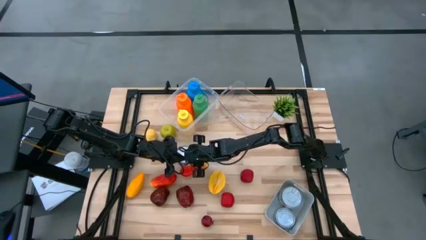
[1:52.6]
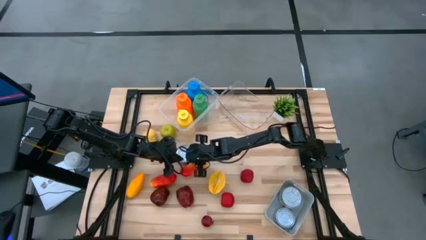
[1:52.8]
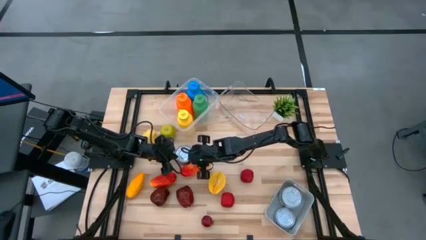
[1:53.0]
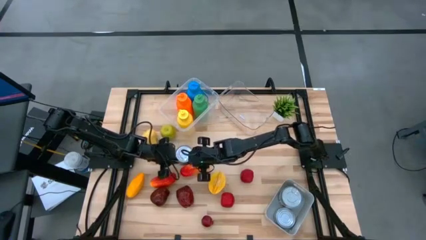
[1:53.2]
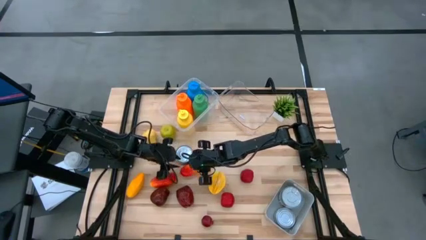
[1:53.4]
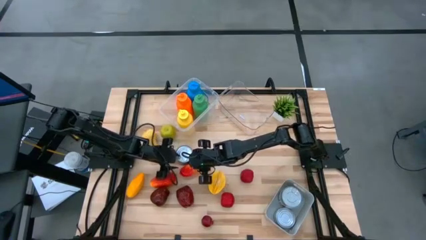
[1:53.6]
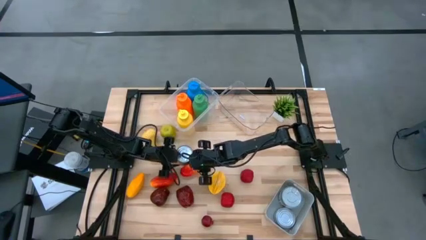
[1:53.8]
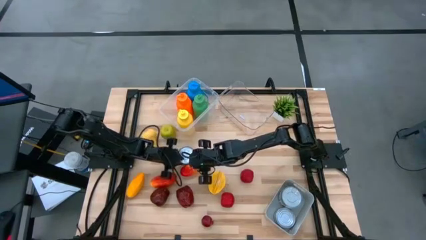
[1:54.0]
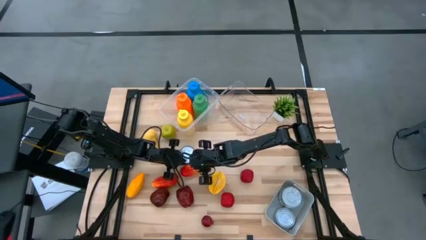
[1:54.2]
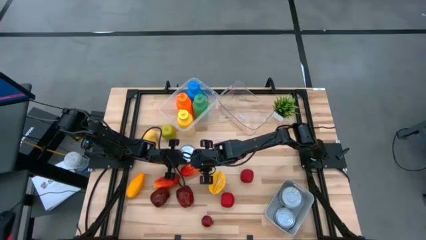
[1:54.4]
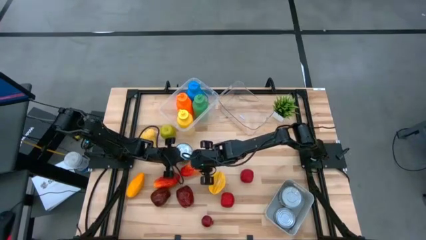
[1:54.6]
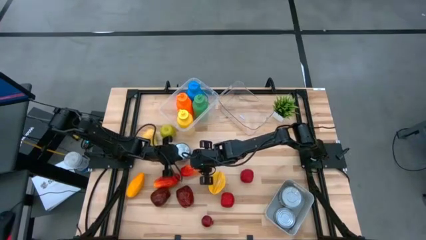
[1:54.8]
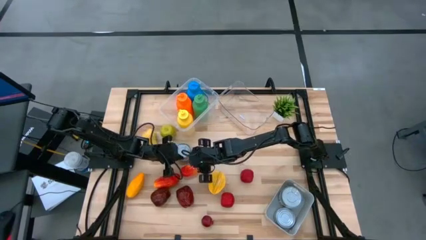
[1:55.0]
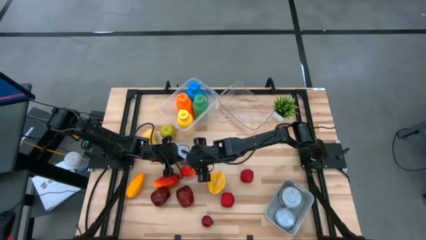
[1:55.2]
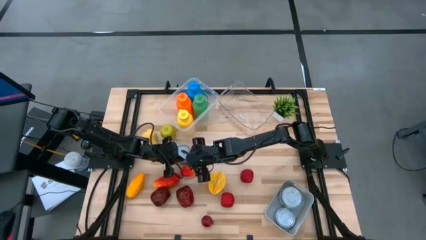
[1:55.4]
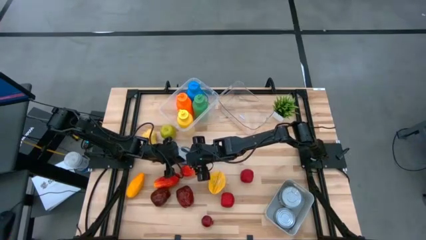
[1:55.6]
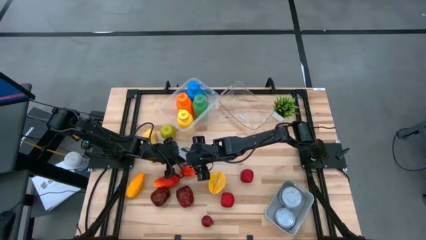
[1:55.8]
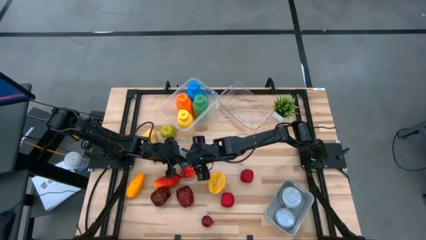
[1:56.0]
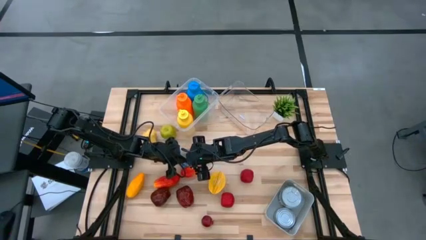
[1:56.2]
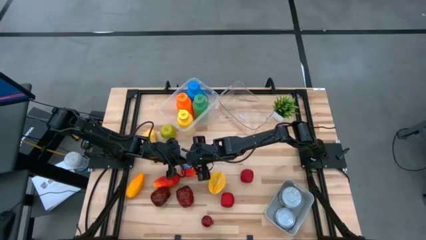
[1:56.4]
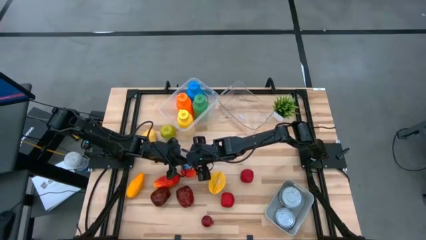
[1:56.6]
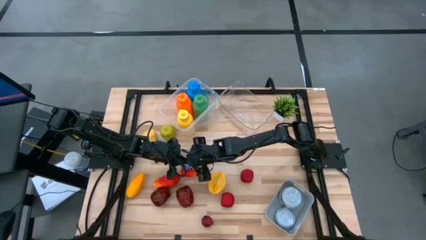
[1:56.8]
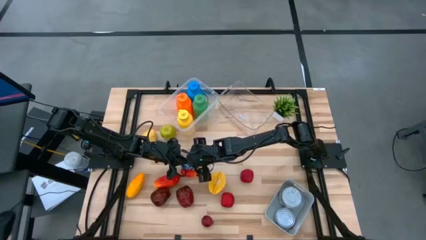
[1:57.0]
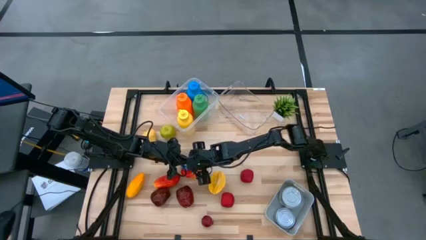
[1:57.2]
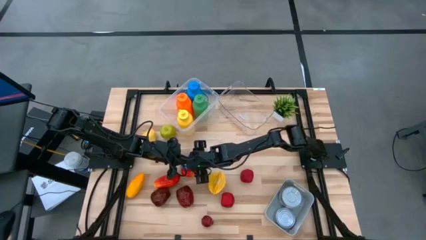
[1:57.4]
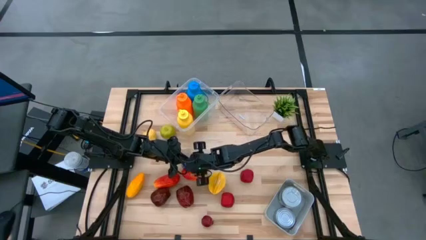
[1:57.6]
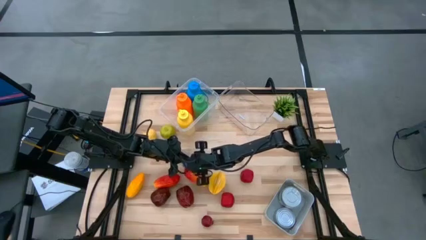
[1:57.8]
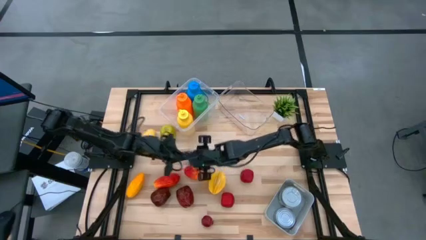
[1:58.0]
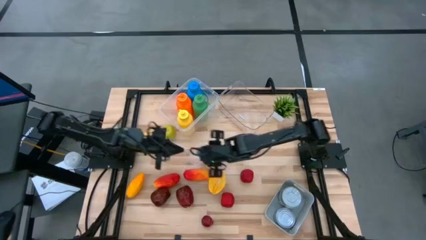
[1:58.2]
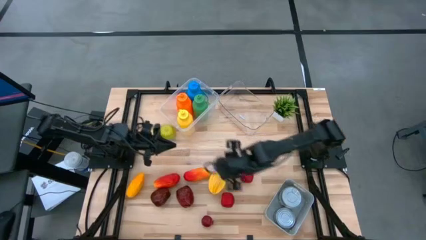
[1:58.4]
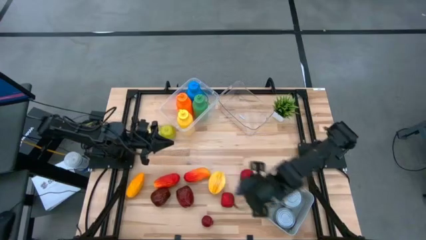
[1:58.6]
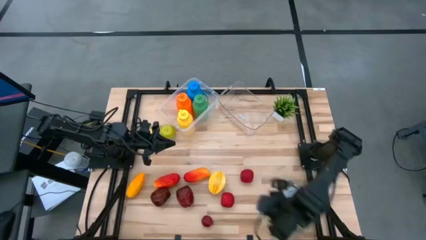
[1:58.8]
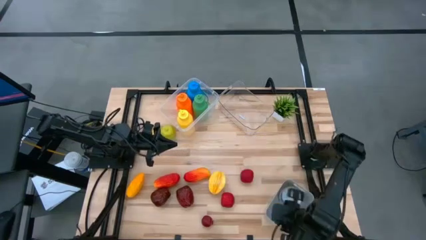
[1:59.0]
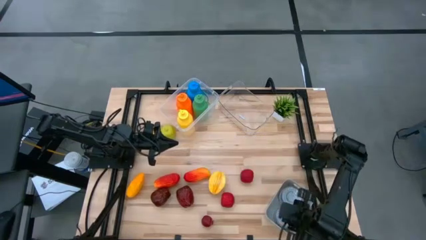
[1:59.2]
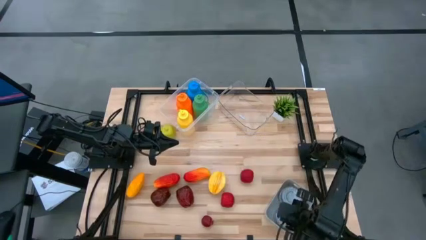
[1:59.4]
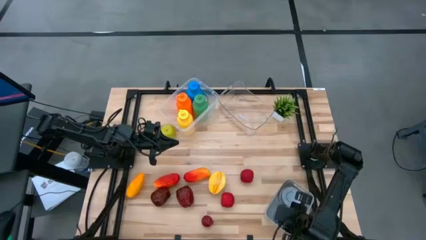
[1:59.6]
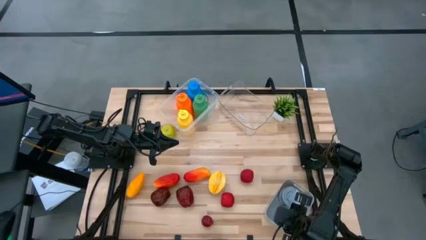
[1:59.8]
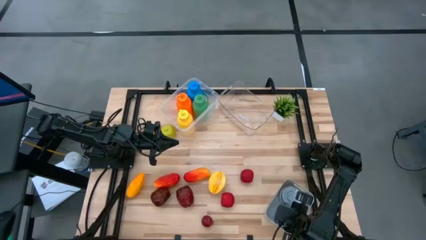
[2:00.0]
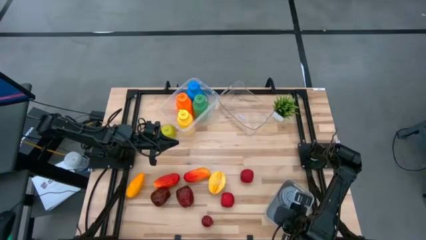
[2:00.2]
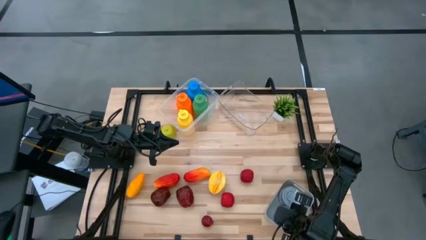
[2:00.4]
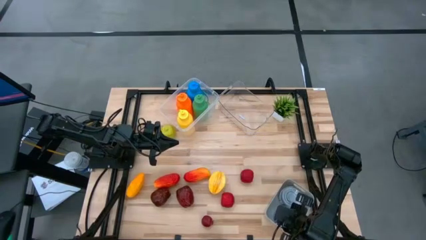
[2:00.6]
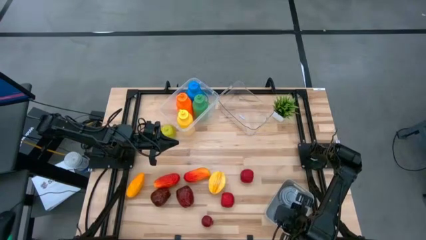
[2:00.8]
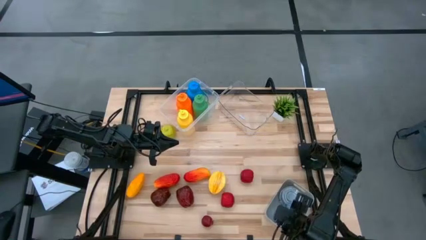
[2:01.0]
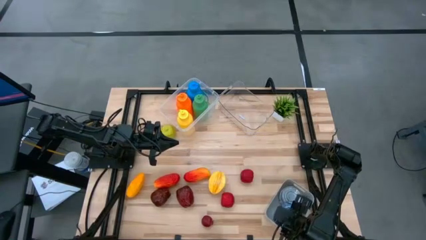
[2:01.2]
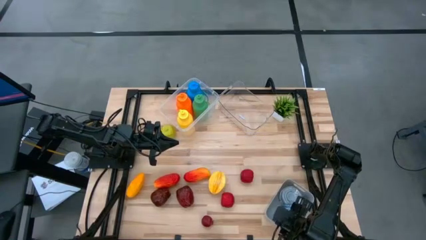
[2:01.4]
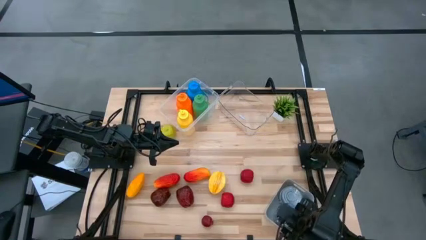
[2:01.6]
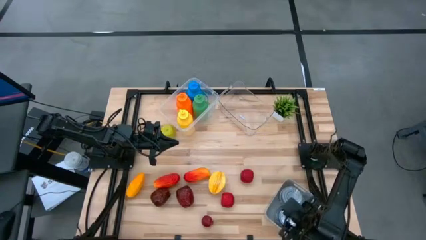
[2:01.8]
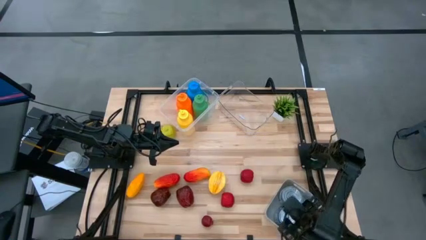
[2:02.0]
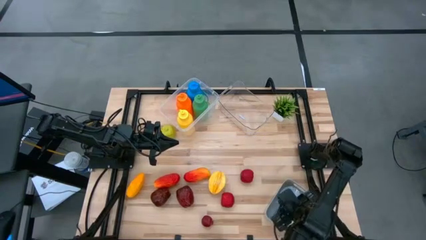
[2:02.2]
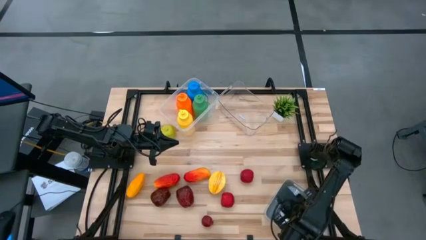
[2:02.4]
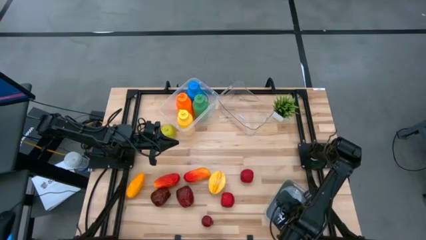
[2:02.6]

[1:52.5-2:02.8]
Task: Pick & Place Food Item
Put the blue tuna can into the gray bin

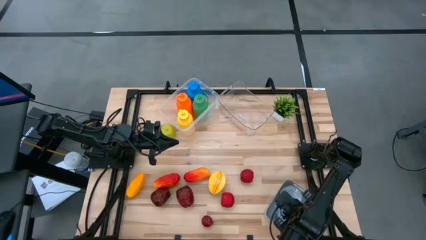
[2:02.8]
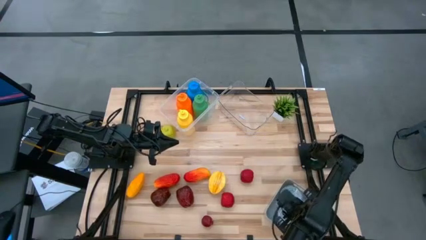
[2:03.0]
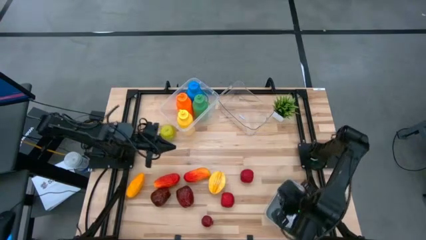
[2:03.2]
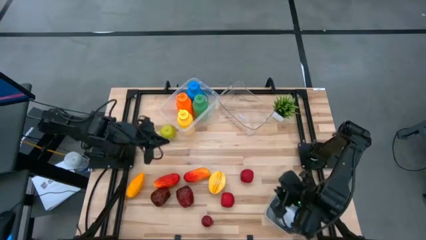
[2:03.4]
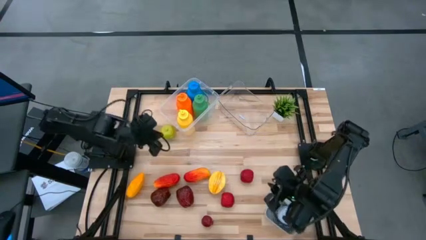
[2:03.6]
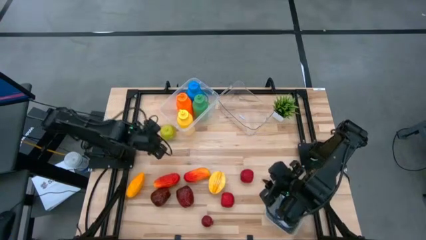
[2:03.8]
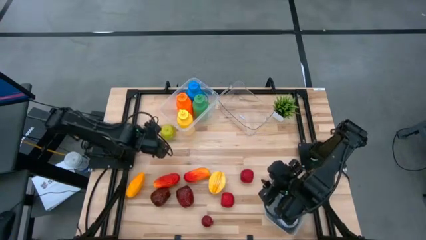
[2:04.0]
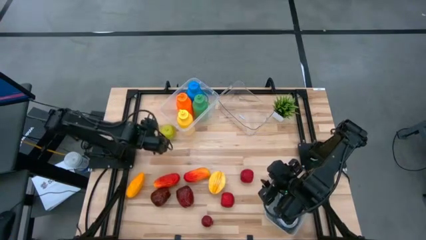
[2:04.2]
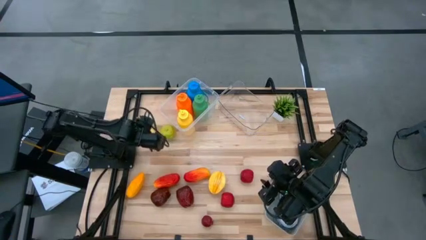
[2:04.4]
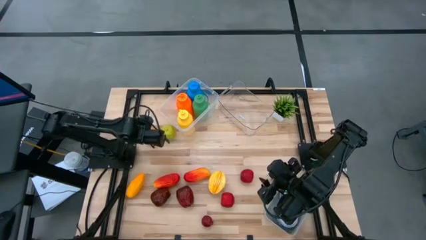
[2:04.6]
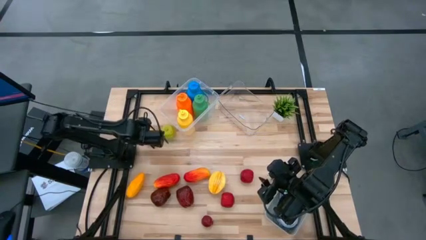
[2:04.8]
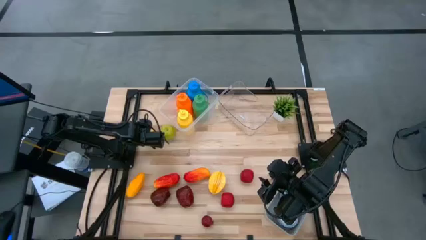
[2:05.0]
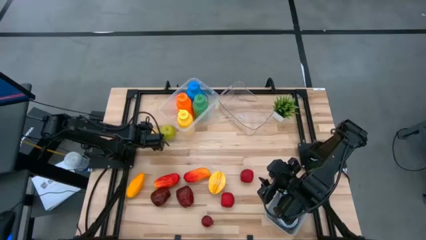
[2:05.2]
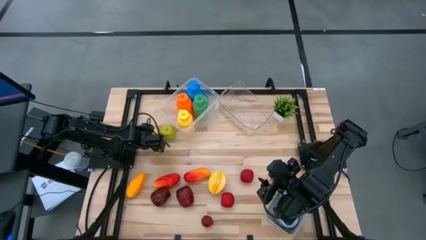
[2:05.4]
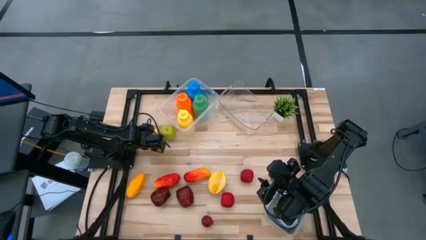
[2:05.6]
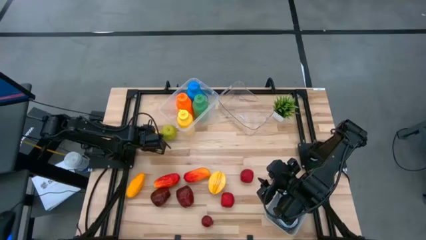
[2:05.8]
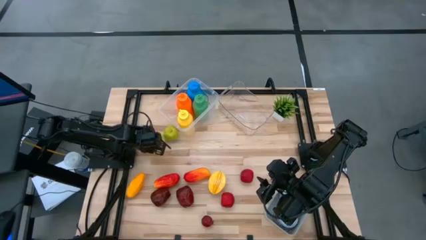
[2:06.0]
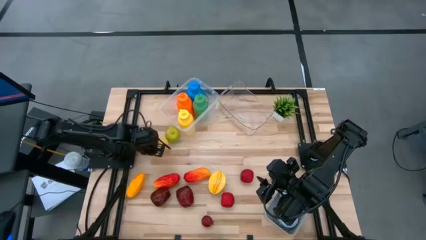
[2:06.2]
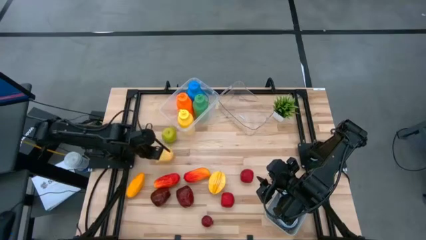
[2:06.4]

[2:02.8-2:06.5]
Put the yellow pear into the right transparent bin

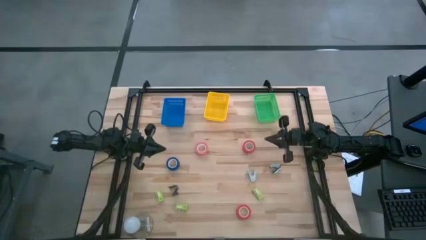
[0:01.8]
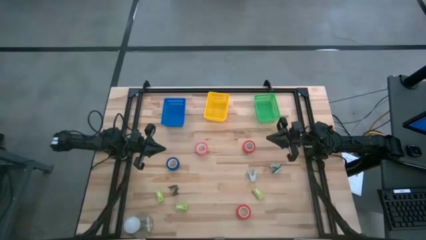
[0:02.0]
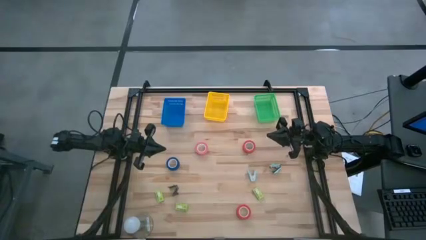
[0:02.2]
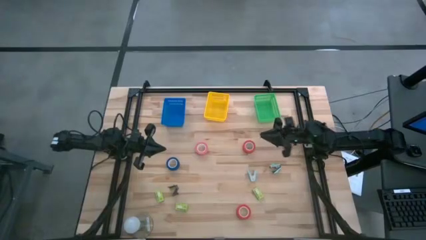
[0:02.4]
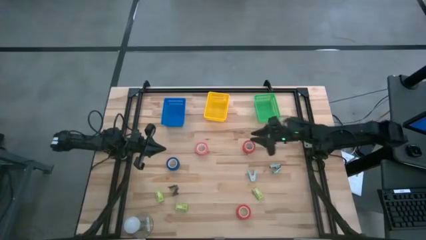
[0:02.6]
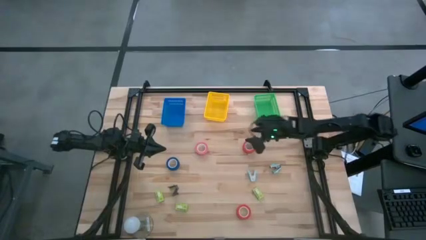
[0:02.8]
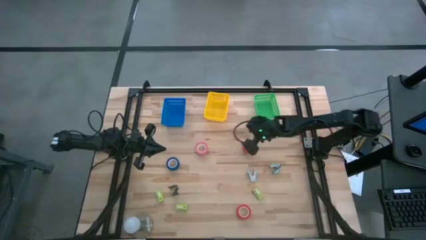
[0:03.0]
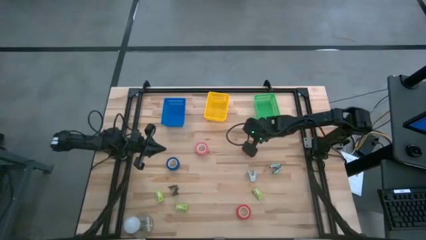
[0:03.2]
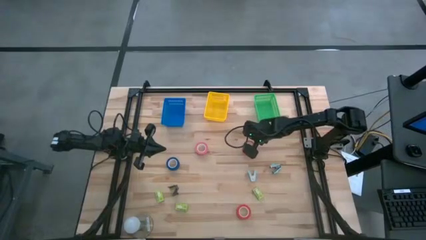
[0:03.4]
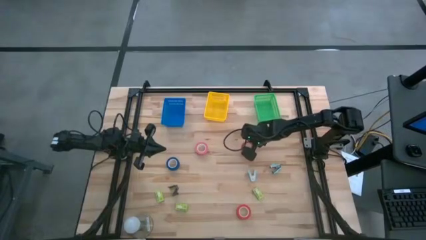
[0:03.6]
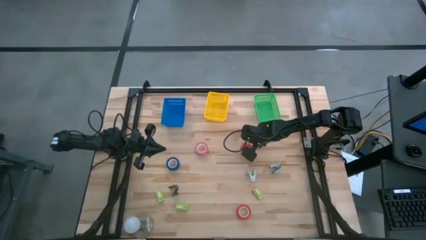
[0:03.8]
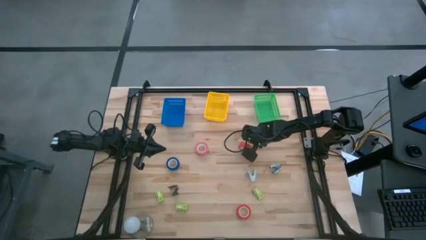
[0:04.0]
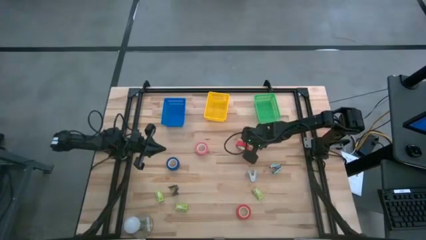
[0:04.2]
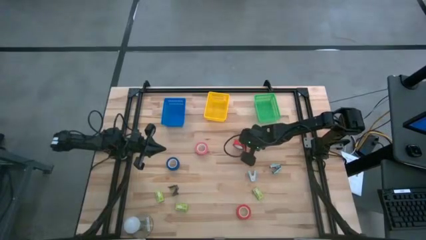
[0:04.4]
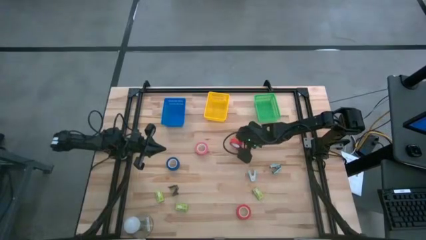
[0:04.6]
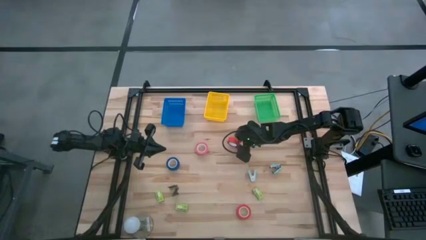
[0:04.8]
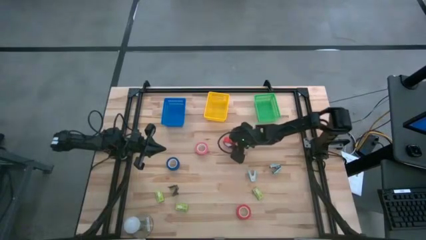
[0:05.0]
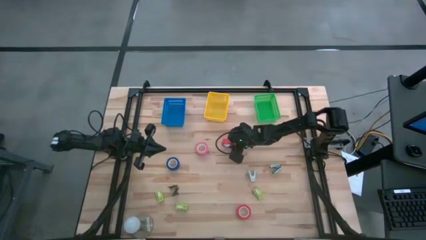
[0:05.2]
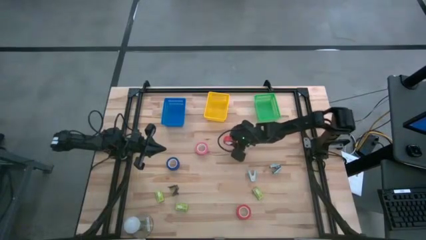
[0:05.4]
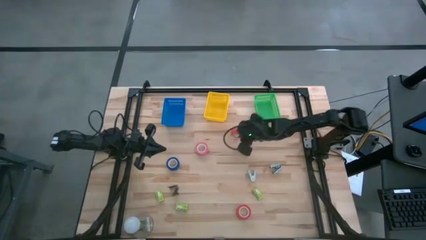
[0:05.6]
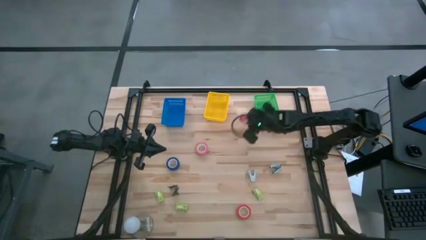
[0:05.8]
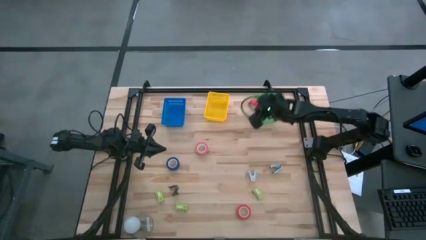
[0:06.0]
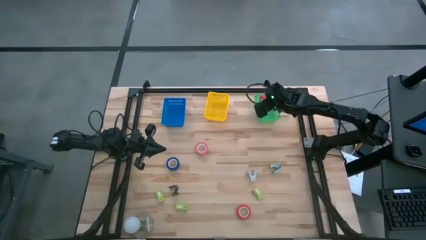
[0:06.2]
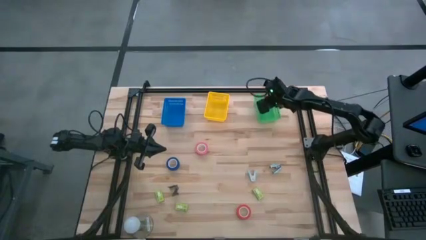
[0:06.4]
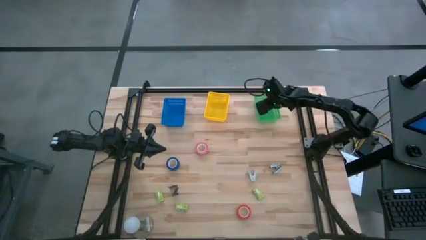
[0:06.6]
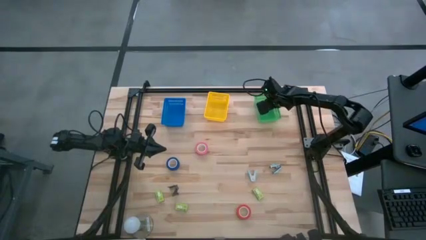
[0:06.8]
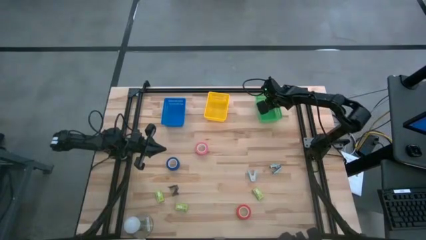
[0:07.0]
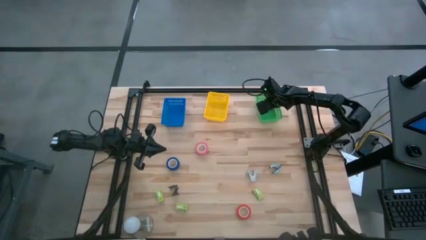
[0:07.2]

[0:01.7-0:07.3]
Task: Pick and place Stapler, Stapler remover, tape
Put the red tape into the green bin
